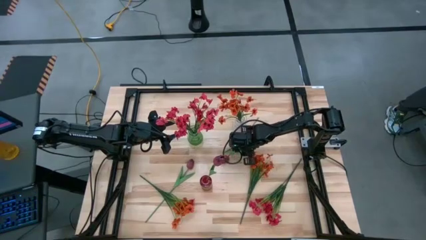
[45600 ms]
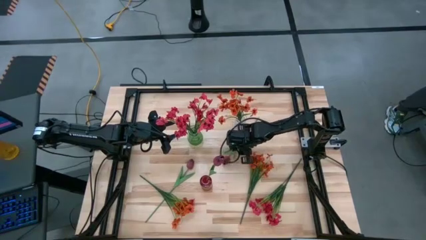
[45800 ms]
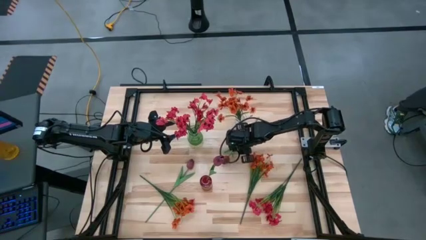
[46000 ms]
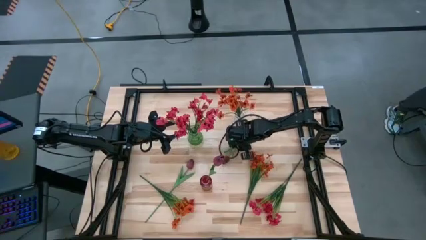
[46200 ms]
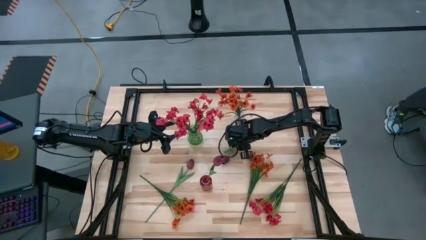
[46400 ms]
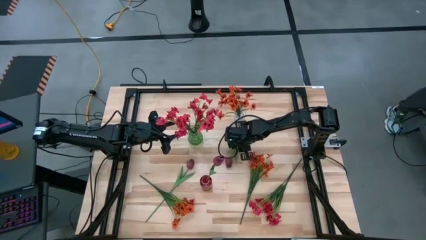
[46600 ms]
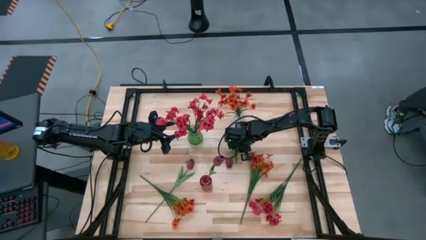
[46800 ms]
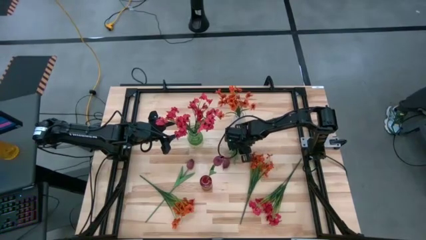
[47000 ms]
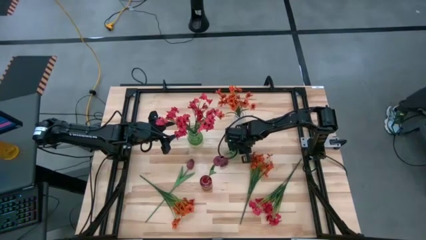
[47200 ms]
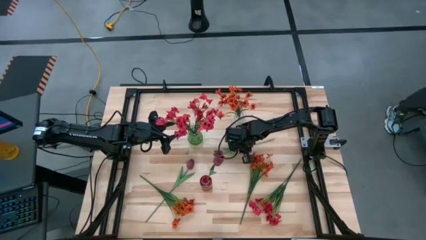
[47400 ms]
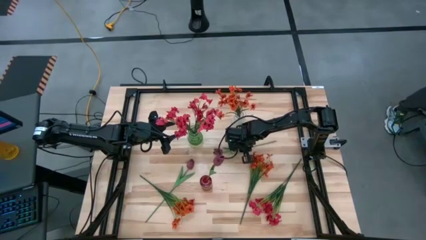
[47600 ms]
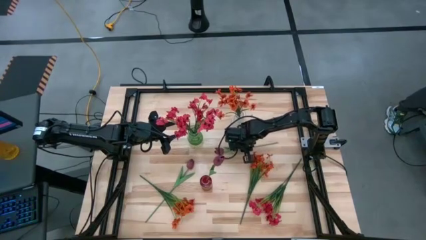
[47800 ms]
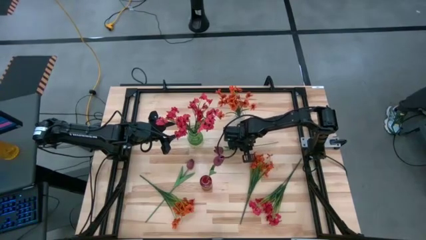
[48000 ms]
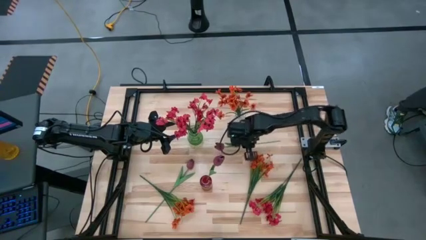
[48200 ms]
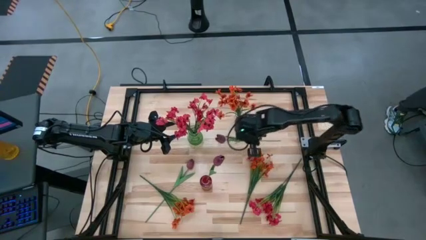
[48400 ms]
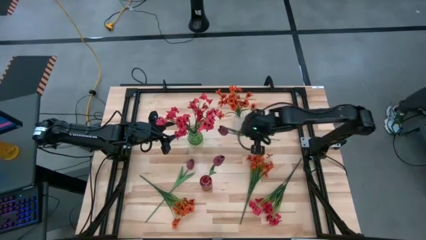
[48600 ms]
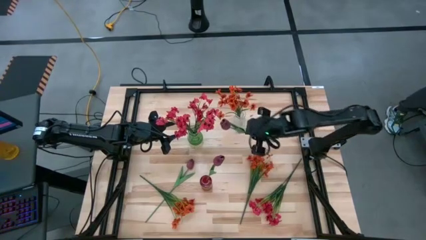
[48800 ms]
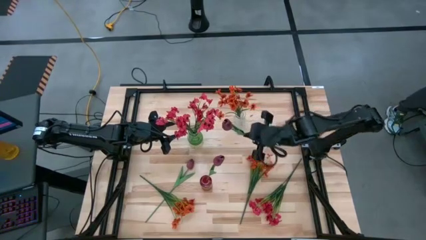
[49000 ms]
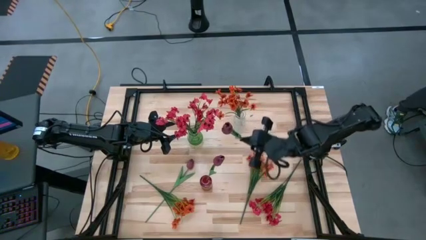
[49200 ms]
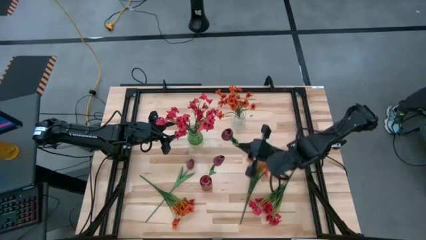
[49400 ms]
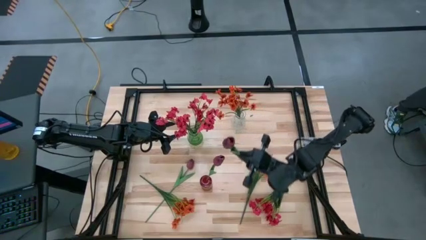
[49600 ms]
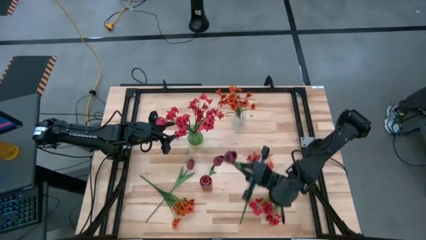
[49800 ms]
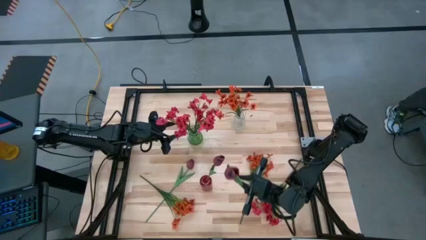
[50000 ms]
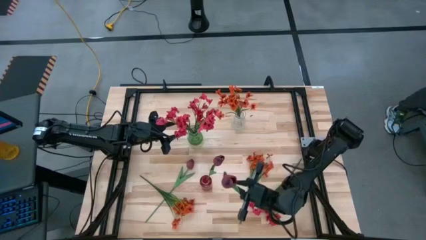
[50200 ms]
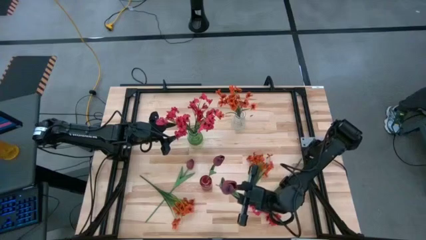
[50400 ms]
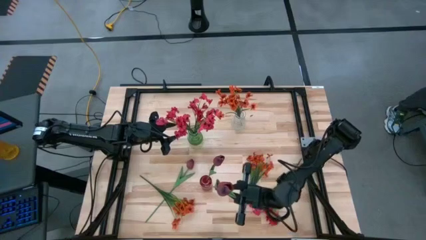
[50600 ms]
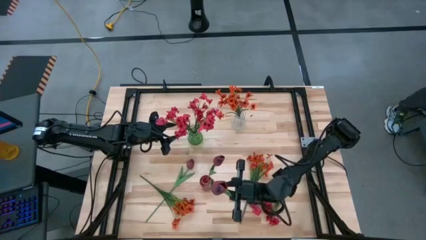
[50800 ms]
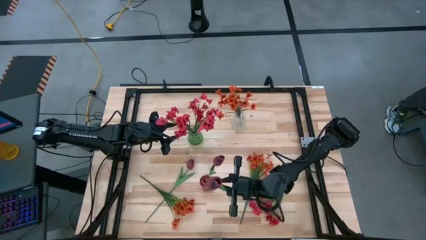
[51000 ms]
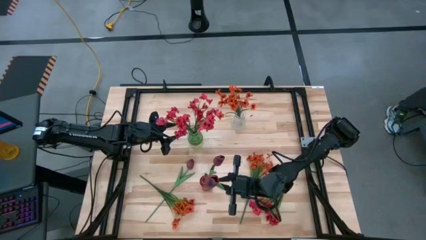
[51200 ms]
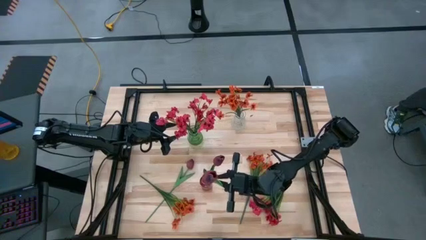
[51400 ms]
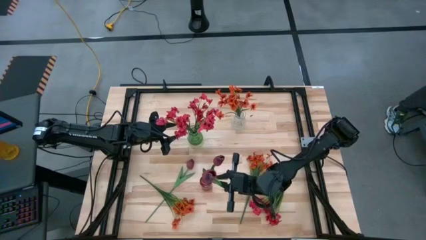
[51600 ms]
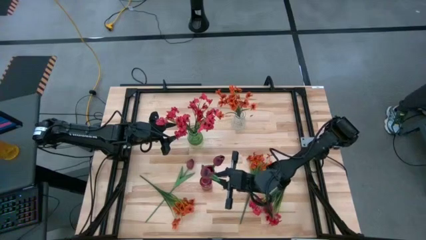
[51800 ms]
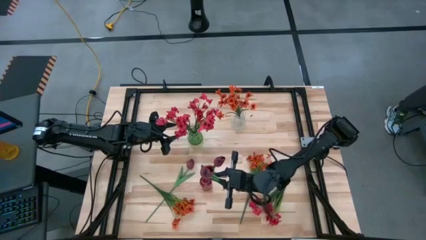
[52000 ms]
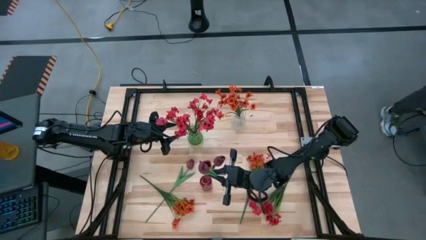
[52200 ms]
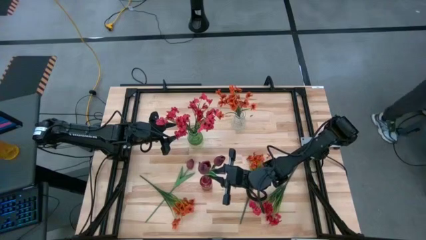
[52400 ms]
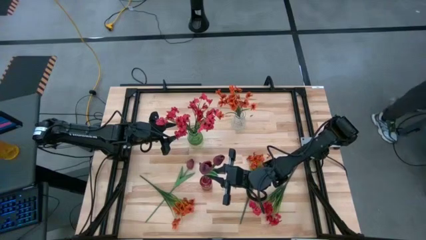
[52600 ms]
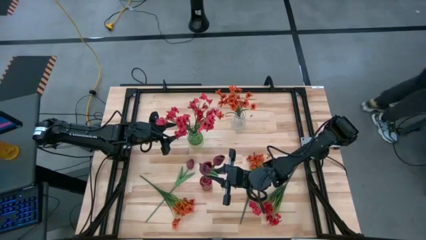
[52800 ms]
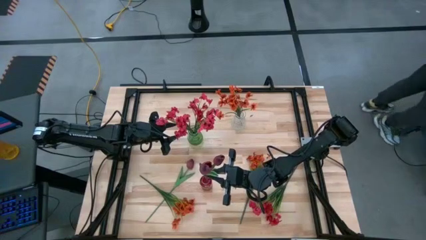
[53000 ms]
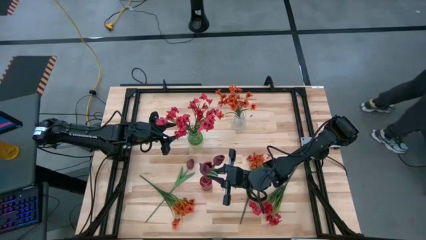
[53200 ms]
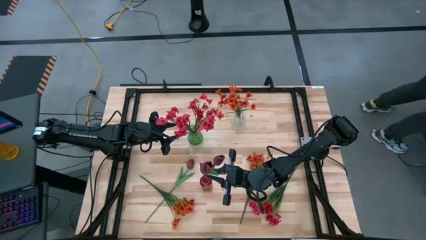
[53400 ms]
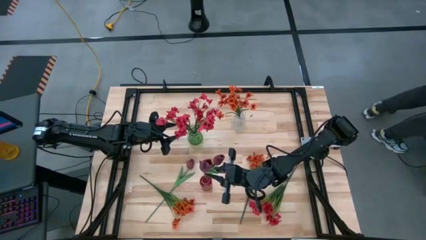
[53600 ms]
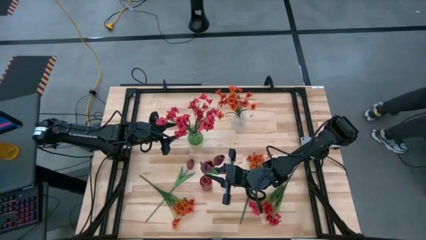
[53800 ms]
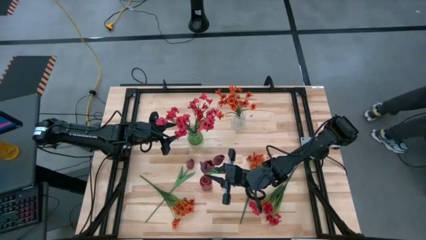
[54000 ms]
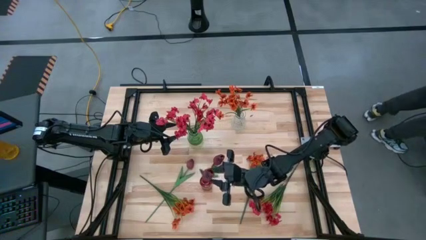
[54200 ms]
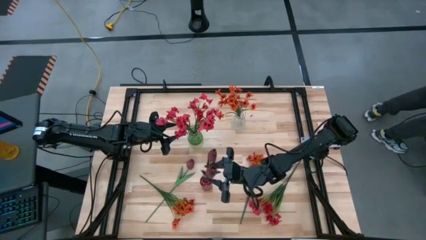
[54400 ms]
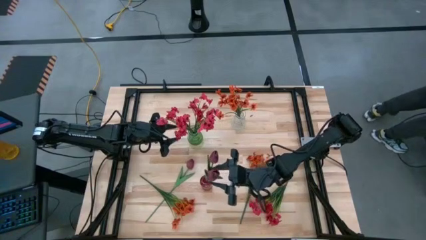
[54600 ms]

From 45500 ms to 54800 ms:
Task: Sort flowers into vase by color
Put the right red flower into the red vase

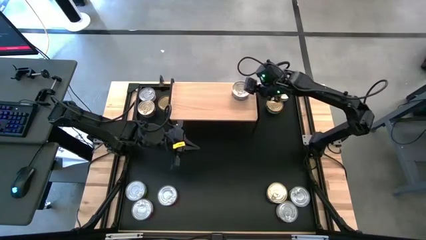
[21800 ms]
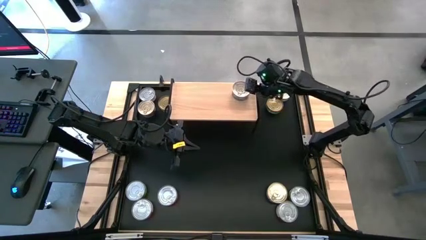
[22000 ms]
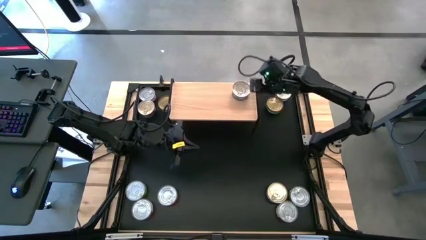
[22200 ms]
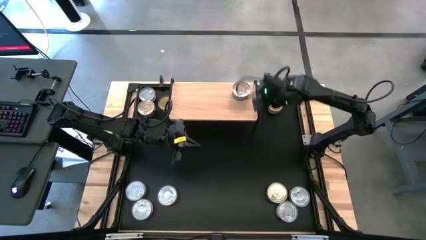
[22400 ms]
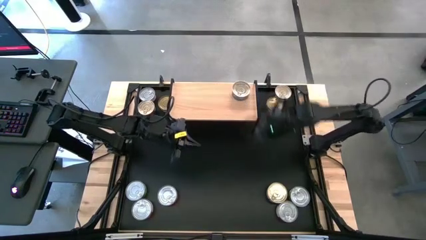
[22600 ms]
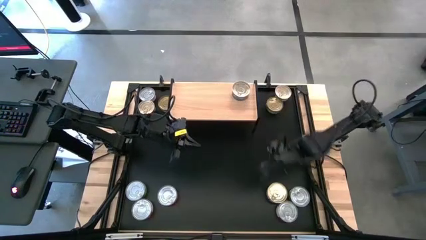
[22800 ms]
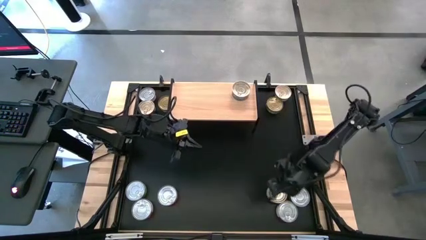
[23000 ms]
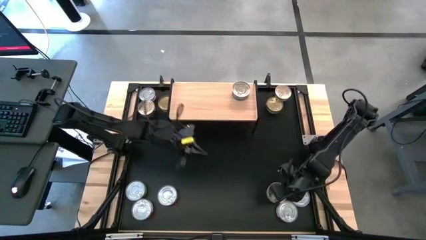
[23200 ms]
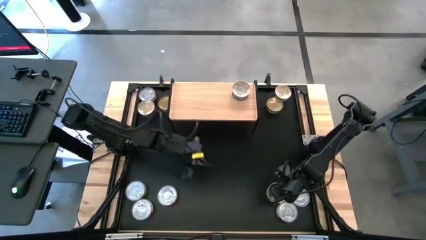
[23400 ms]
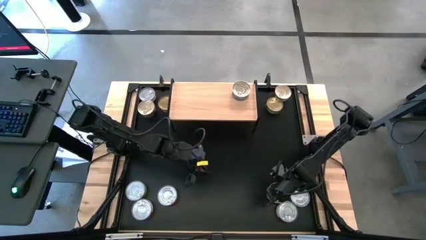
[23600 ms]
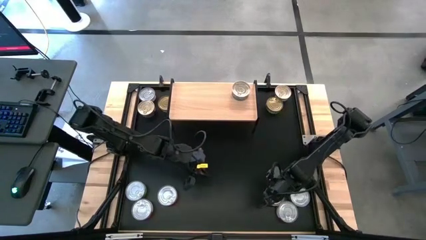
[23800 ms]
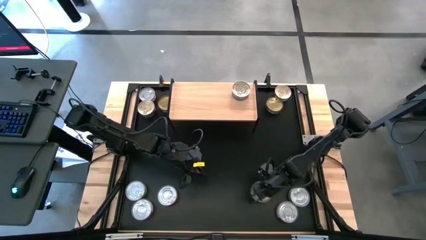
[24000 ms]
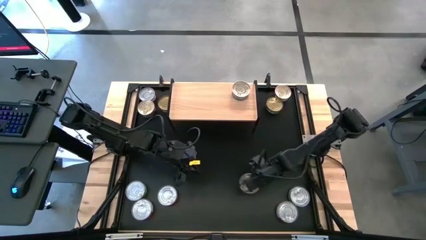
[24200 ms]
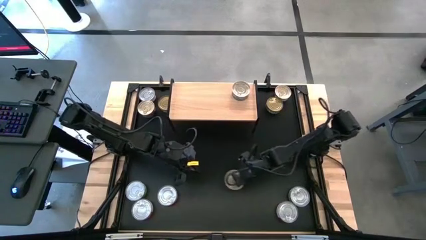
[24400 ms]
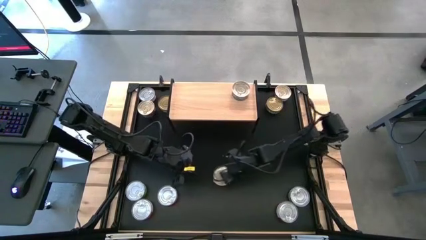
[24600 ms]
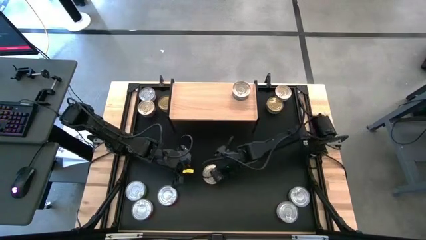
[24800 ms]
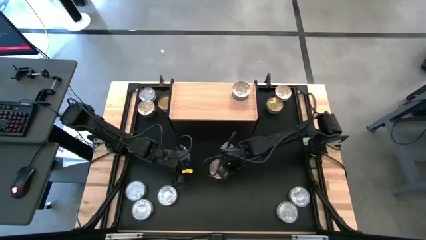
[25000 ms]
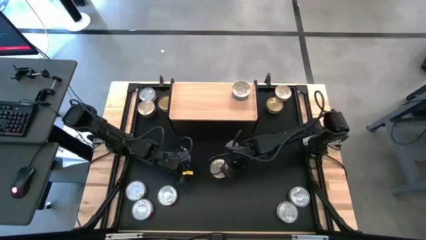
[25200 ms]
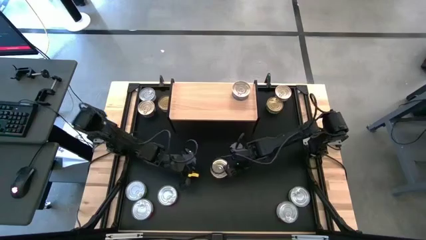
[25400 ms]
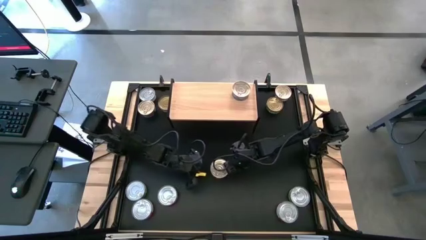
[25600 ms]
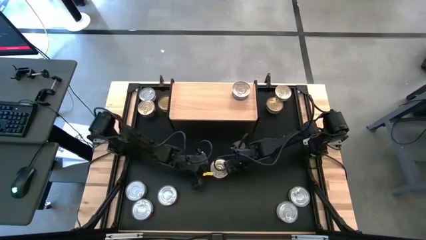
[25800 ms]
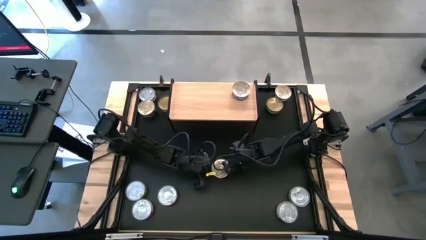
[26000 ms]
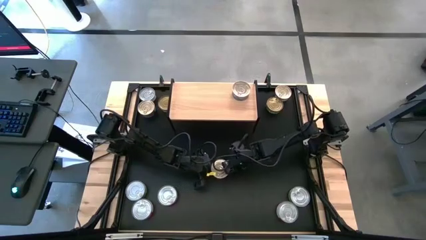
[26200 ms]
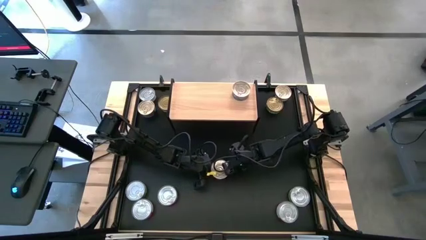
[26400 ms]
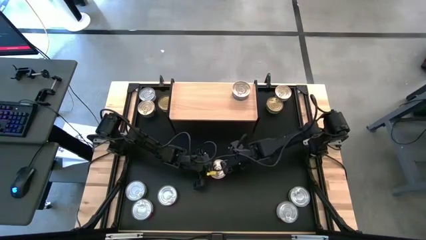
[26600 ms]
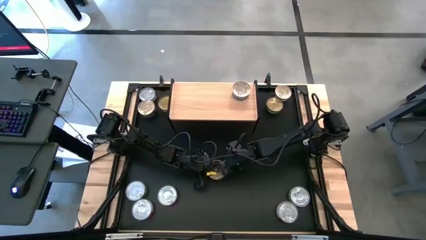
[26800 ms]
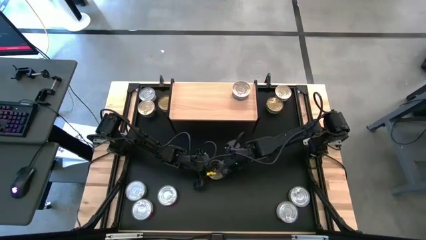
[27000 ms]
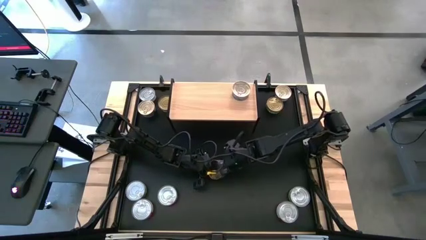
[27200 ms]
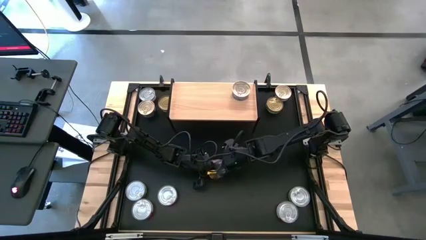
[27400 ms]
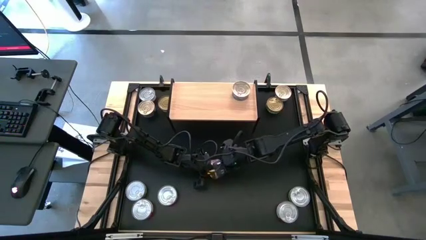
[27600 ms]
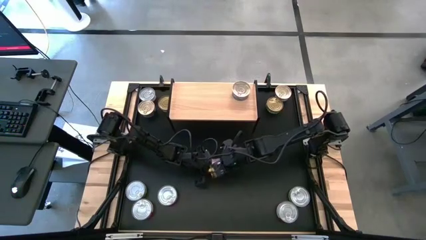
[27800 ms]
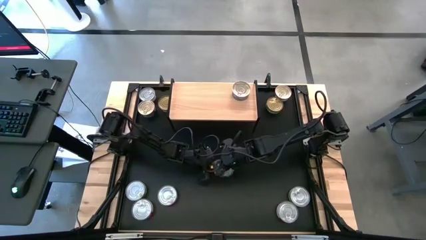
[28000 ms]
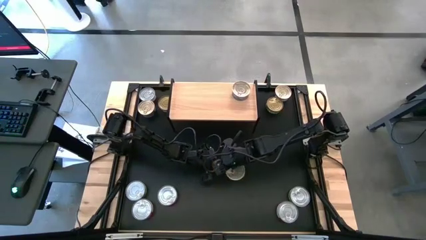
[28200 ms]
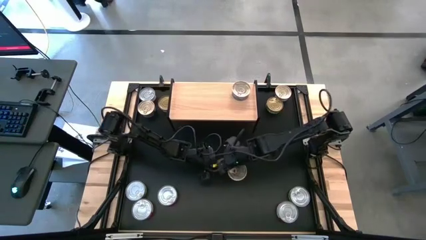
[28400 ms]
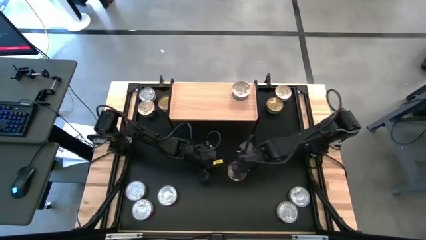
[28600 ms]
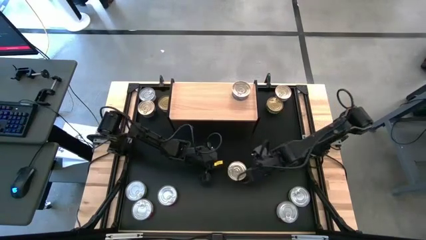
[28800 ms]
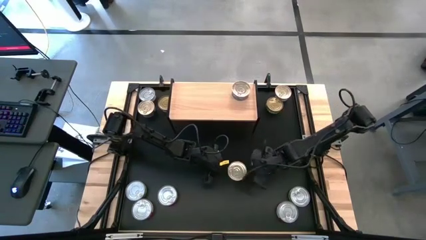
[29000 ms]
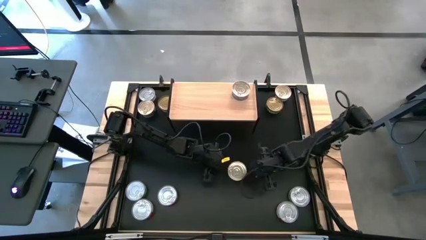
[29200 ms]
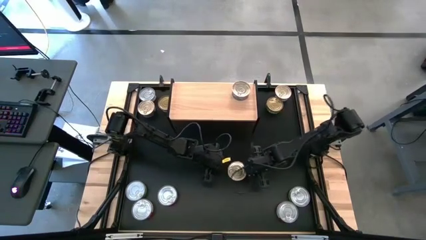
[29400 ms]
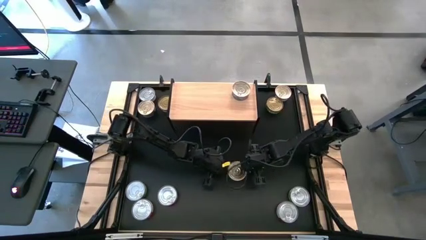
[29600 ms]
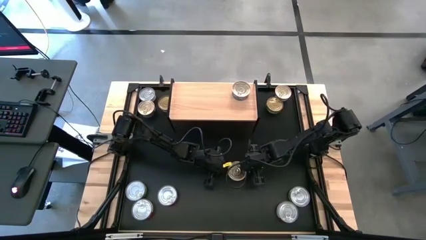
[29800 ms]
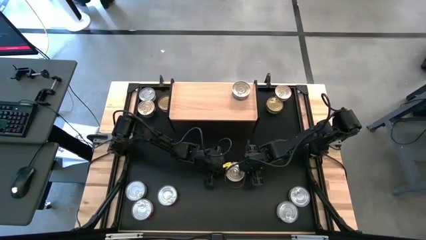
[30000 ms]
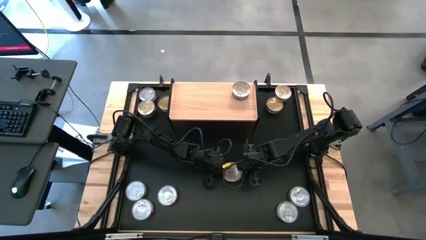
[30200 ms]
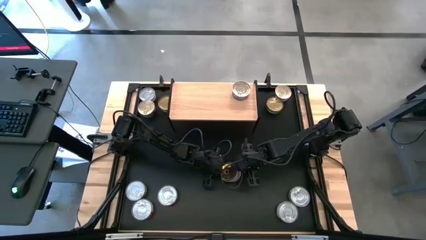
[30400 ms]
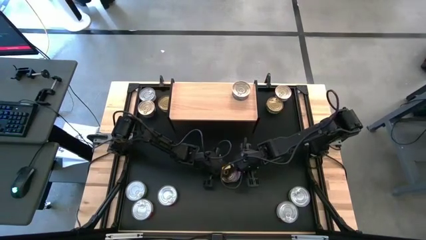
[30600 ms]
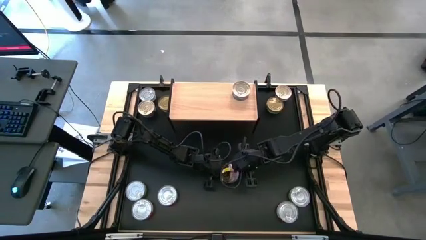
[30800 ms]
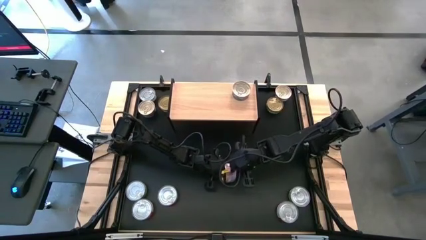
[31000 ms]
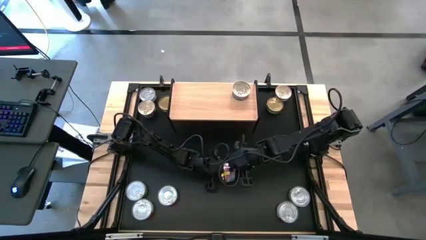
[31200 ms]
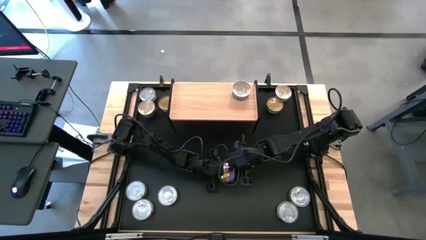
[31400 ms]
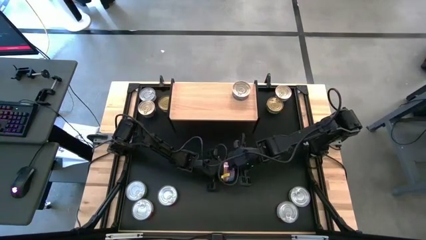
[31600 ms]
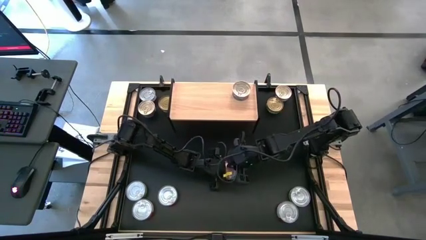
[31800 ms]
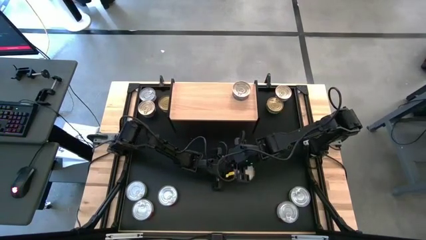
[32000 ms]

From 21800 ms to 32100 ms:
Task: Stack canned seafood by type on shelf
Stack the blue and pink tuna can on top of the blue and pink tuna can on the shelf
